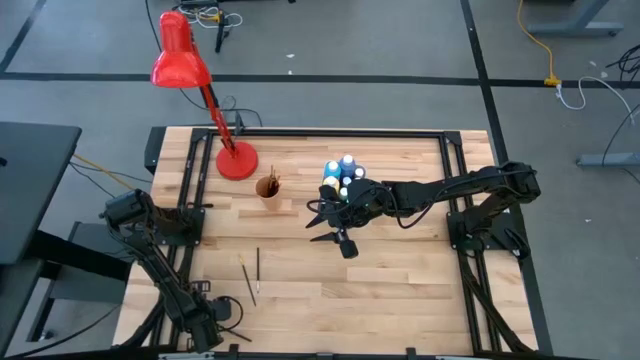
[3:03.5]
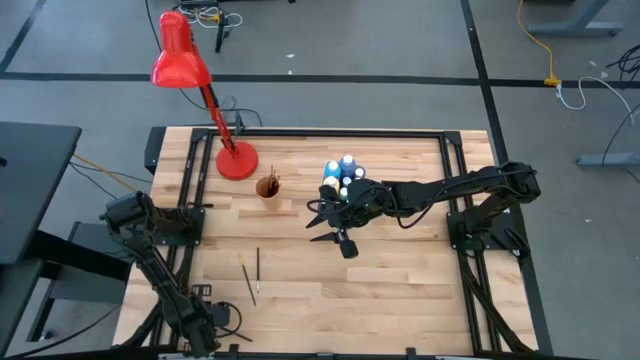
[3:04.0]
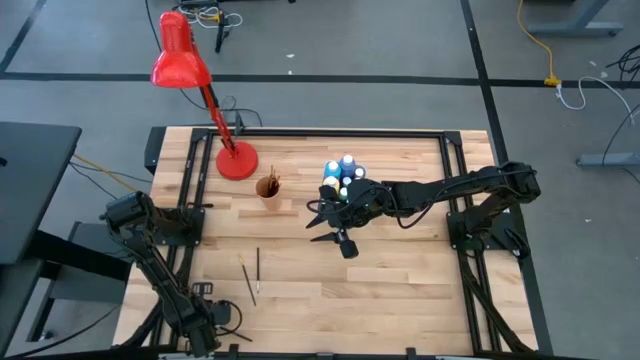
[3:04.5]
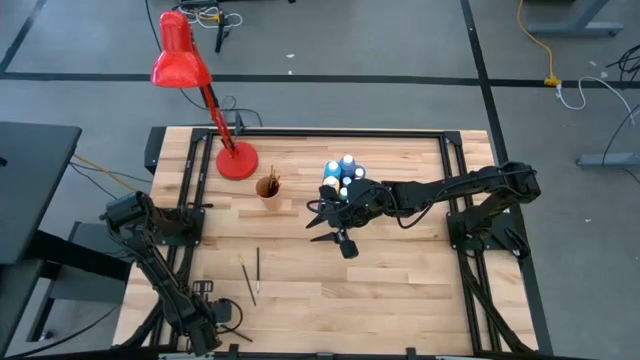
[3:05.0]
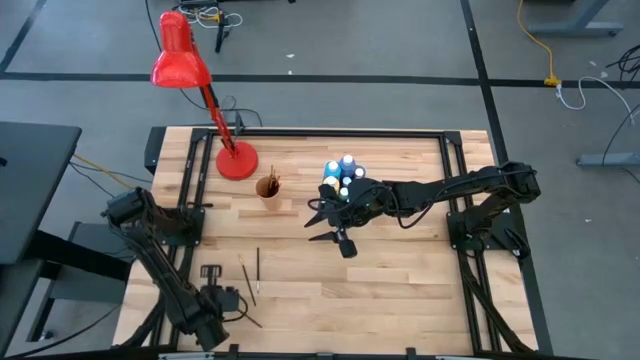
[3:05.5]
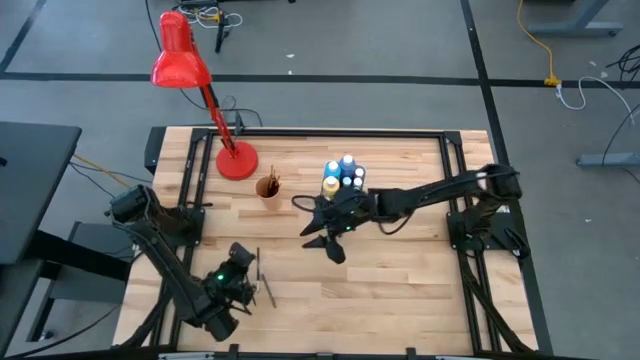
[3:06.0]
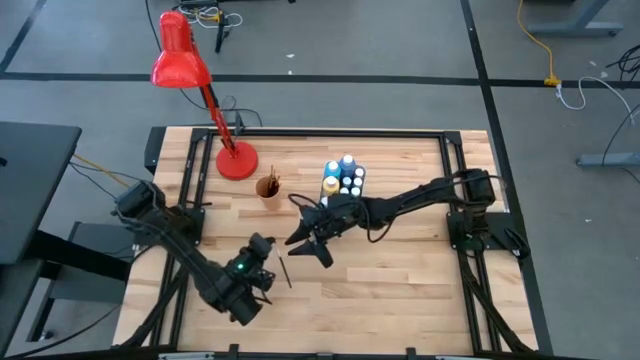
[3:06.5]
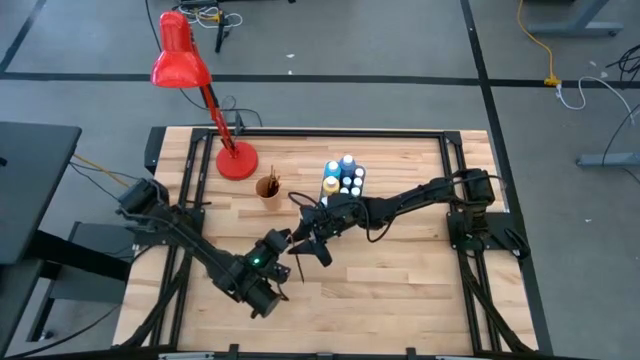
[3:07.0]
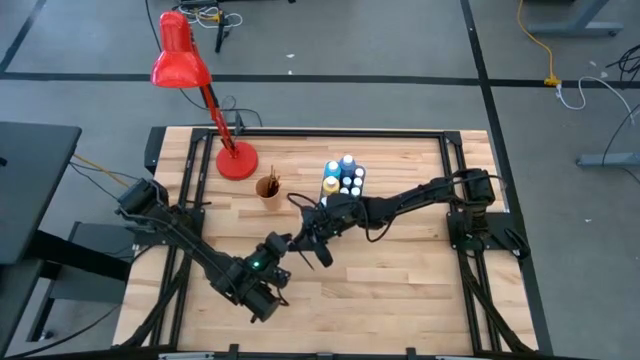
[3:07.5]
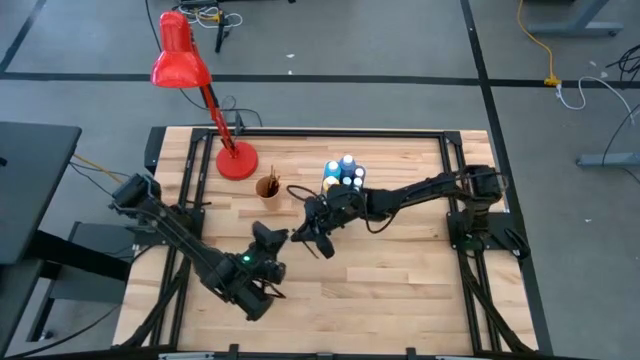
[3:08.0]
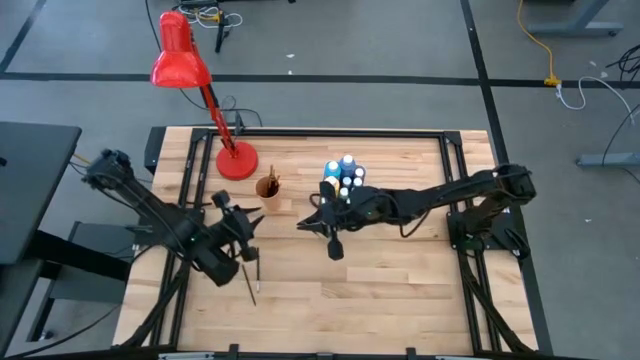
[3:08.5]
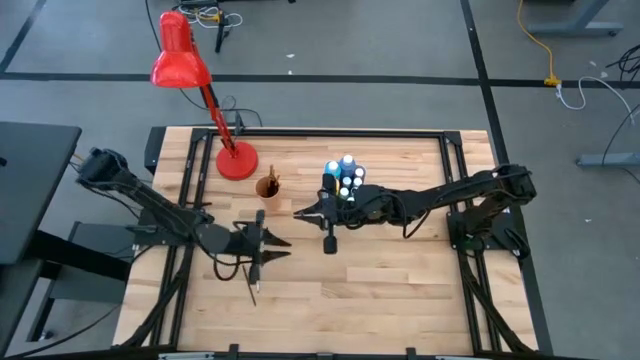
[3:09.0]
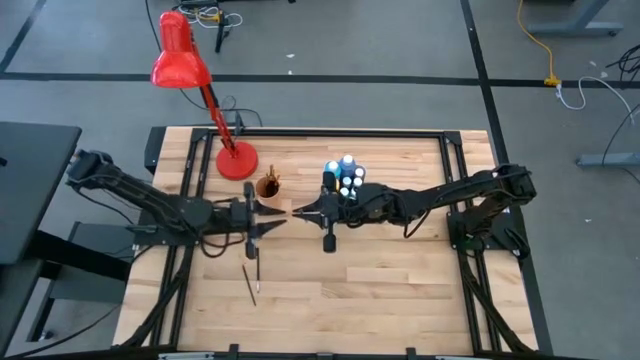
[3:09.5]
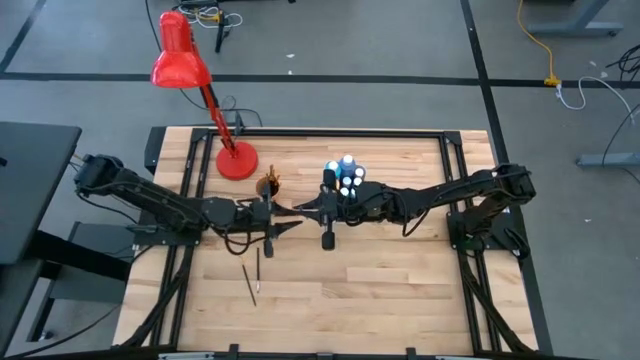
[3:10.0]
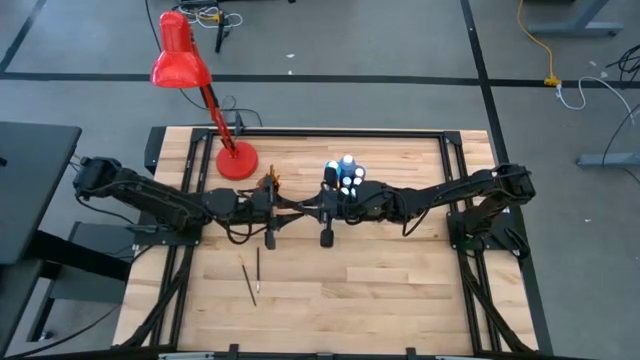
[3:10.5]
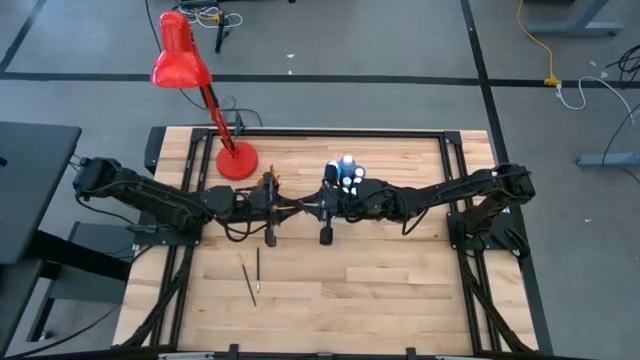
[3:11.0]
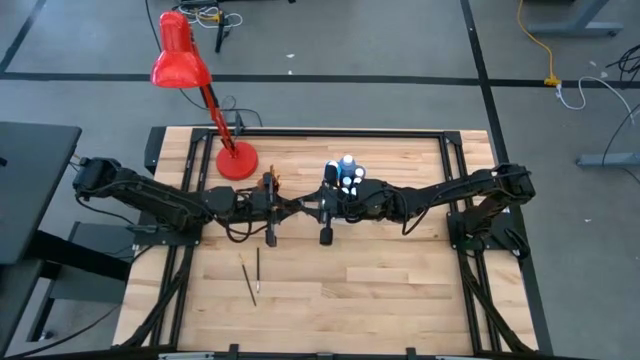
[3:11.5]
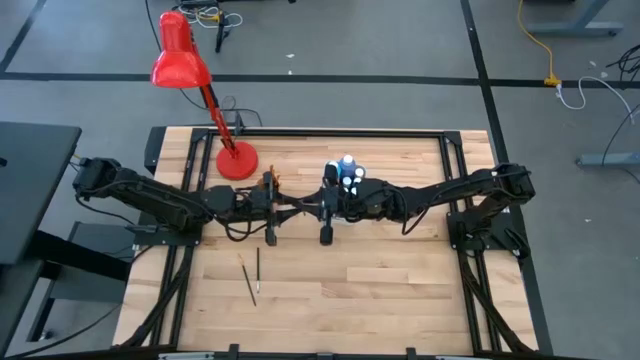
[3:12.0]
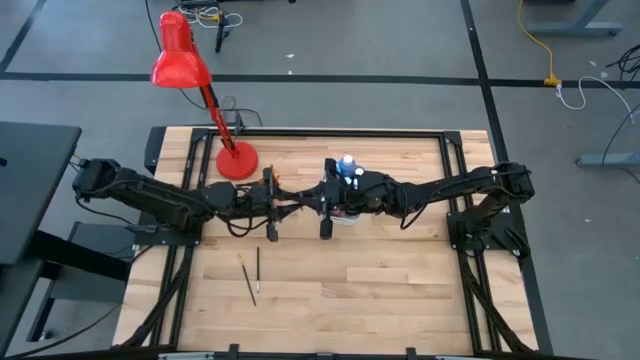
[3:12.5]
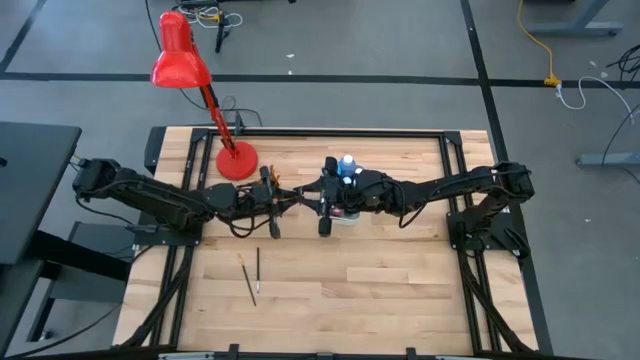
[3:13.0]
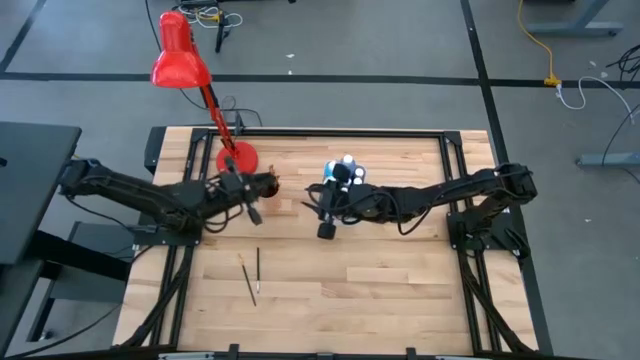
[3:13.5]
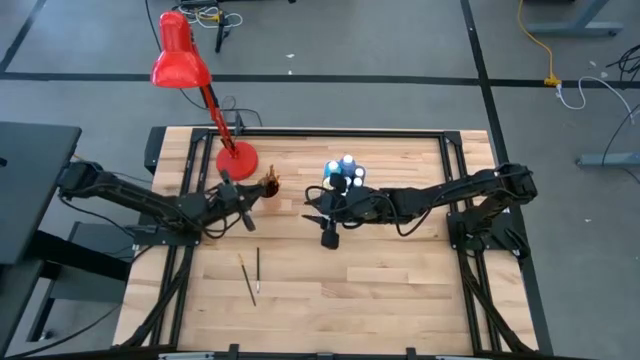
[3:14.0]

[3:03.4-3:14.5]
Task: Pick & Place Paint Supplies
Put the white paint brush into the orange cup

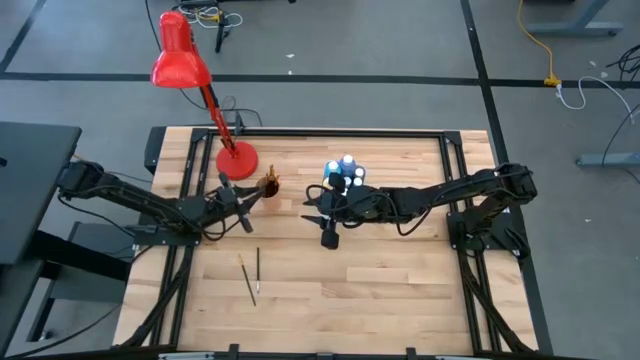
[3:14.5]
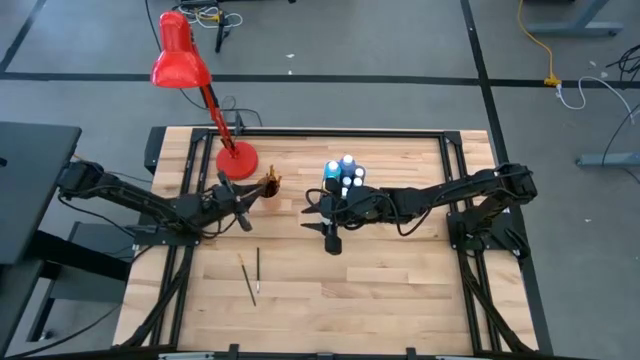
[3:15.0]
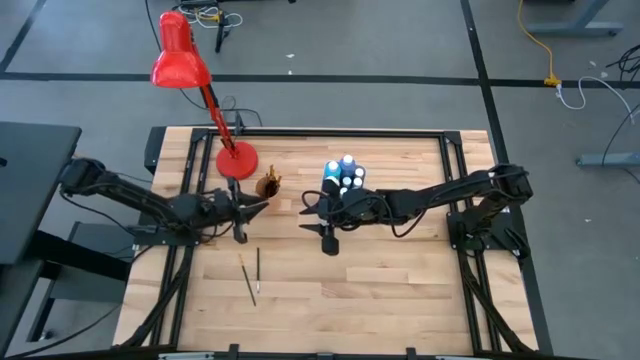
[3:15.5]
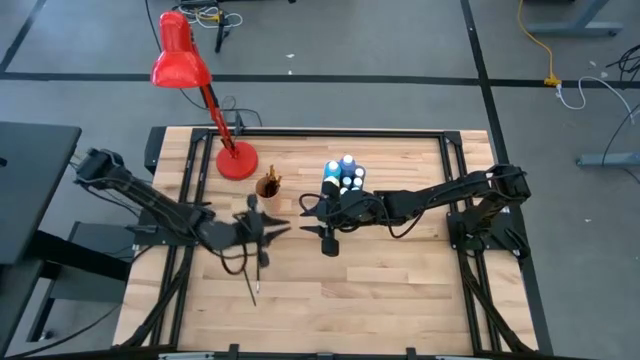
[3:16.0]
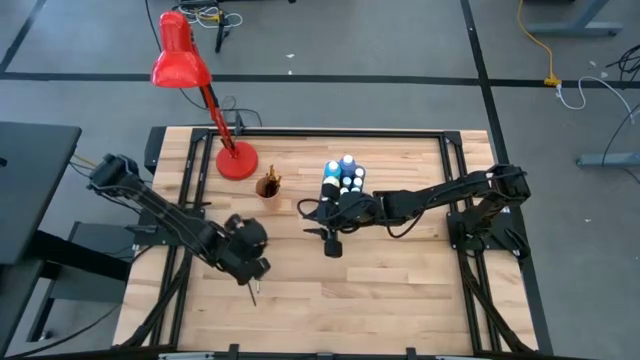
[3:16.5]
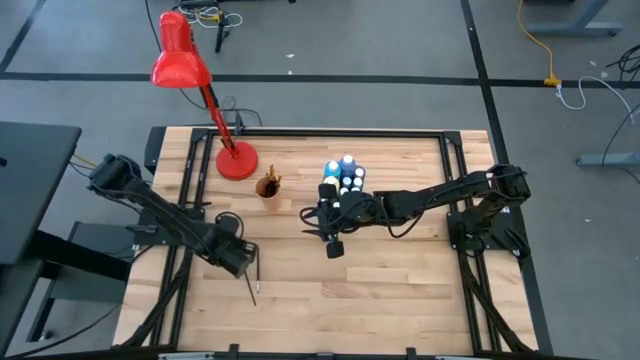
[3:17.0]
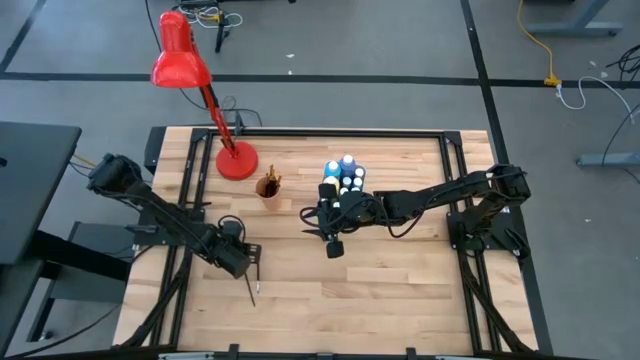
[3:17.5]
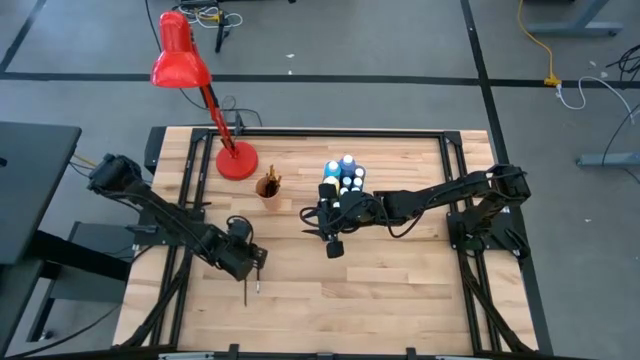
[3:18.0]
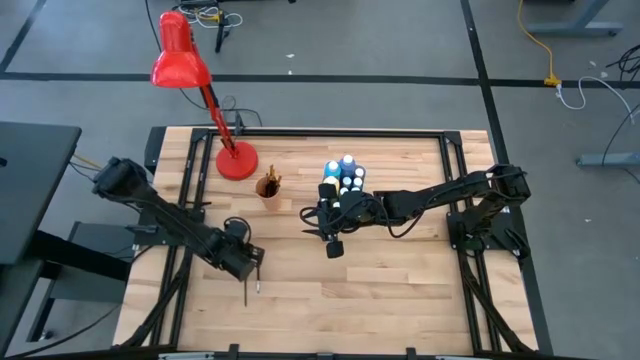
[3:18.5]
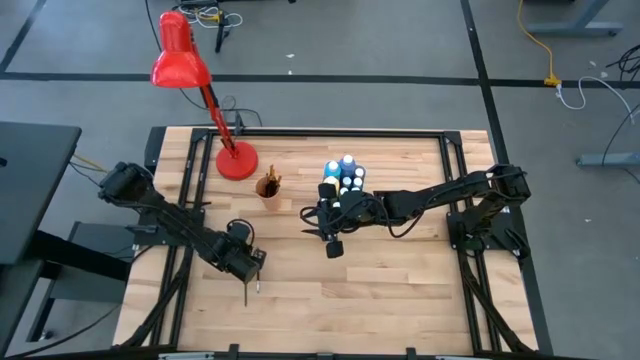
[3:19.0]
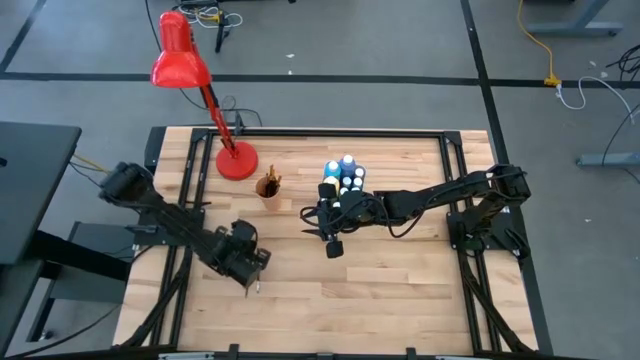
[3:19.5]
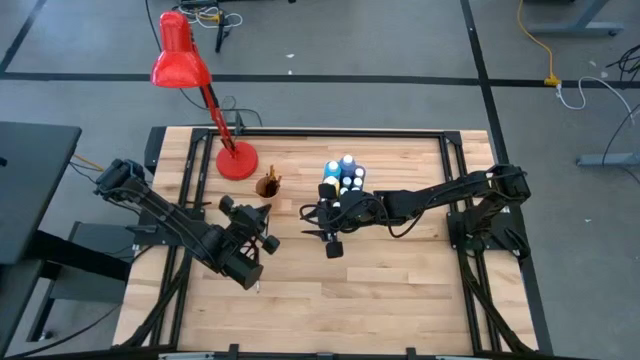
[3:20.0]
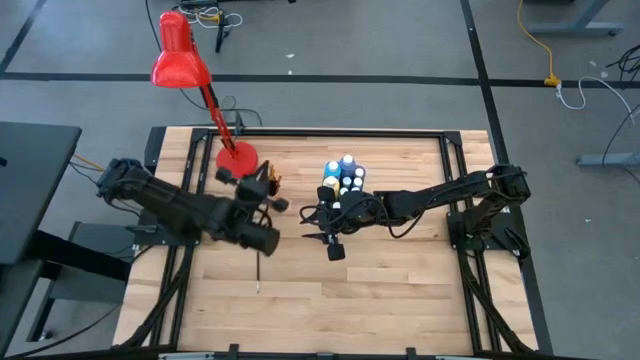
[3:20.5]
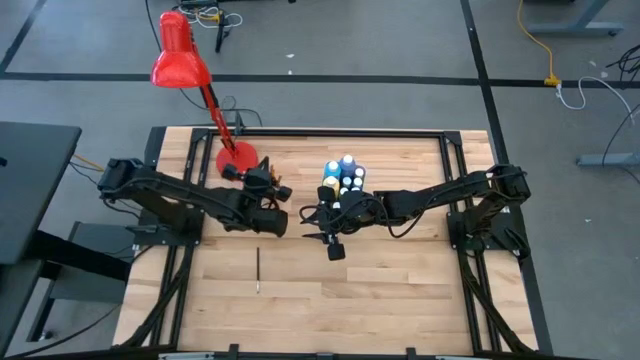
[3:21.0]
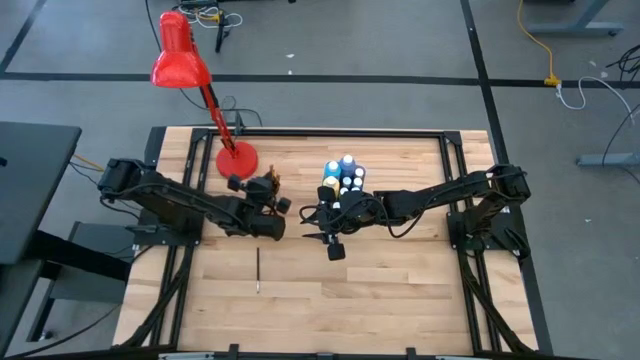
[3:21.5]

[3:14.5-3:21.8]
Put the yellow paint brush into the orange cup

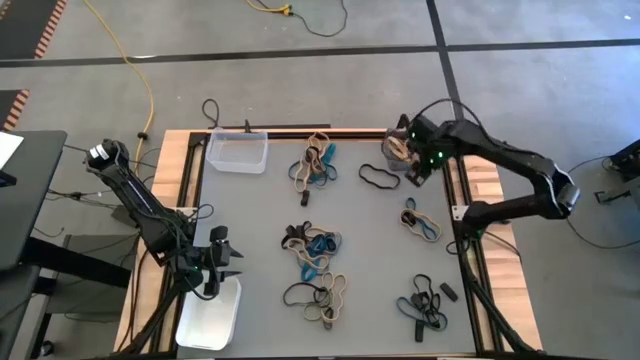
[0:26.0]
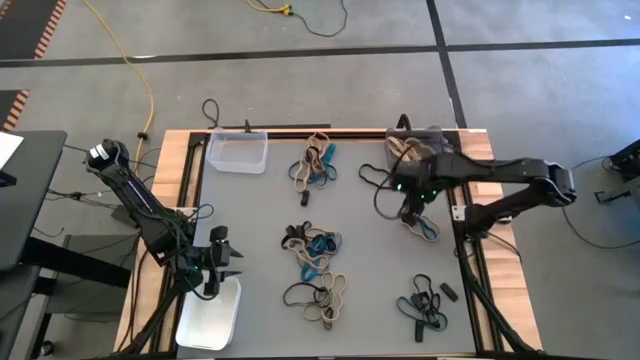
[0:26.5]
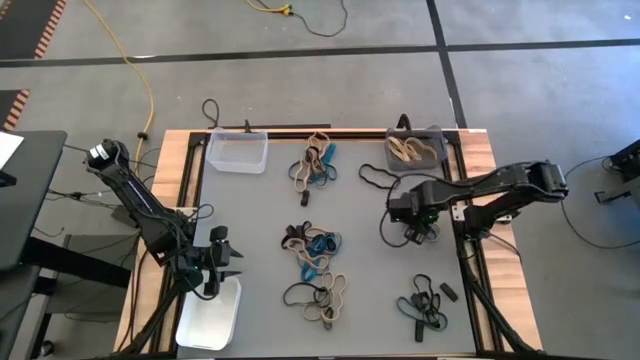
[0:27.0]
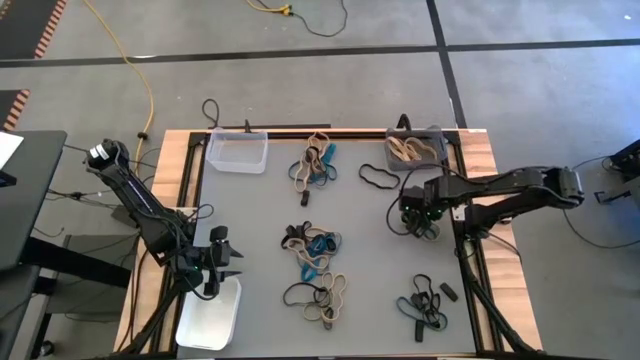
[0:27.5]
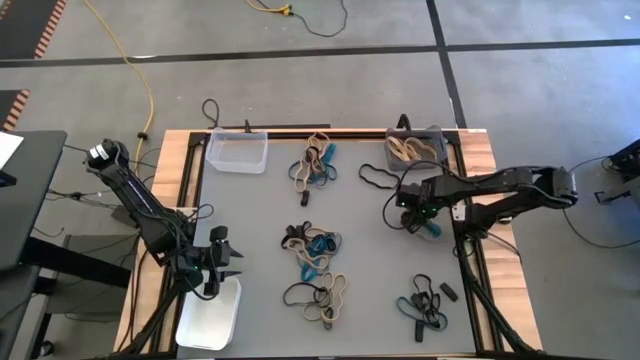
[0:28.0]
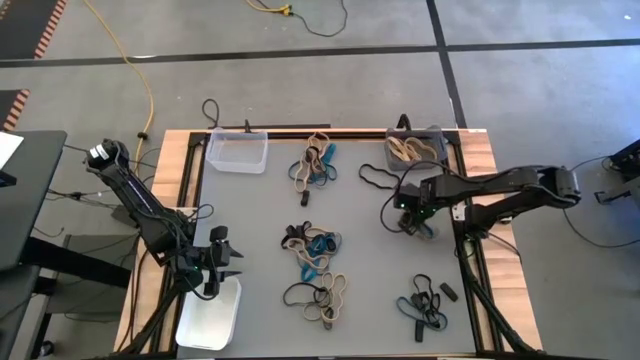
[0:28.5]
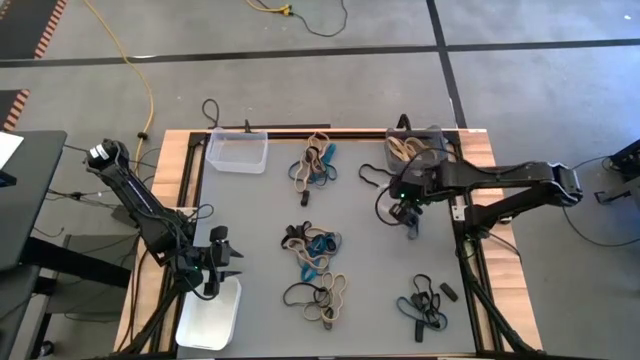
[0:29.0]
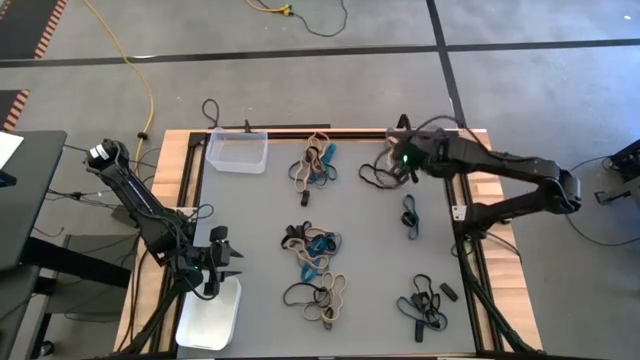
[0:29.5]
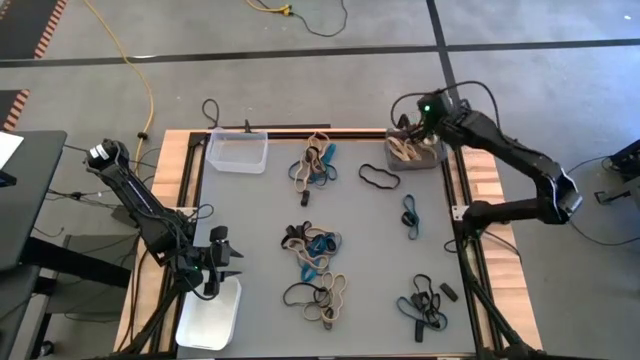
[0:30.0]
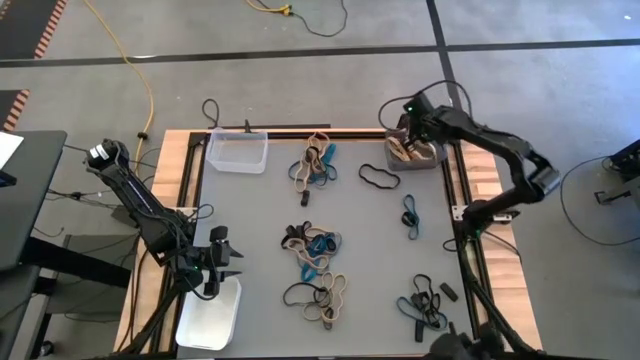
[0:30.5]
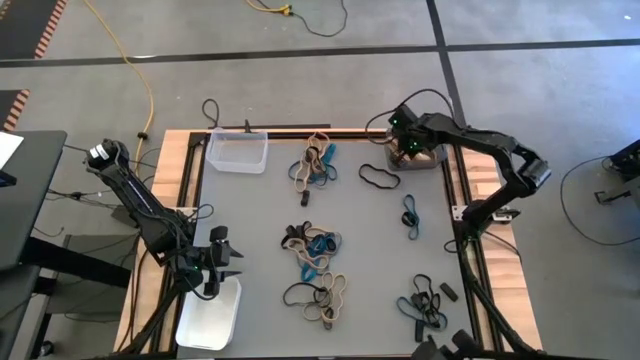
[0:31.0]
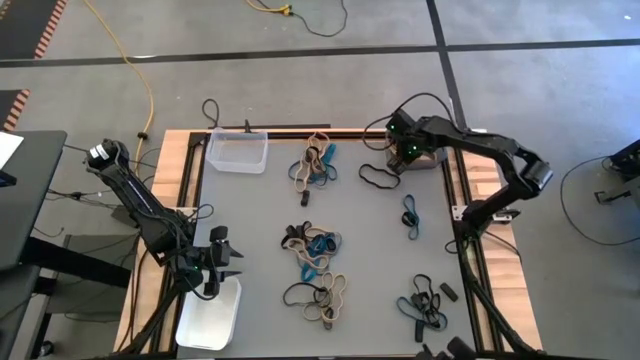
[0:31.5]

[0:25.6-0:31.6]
Task: Sort rubber bands into baskets
Put the white rubber band into the black transparent bin
